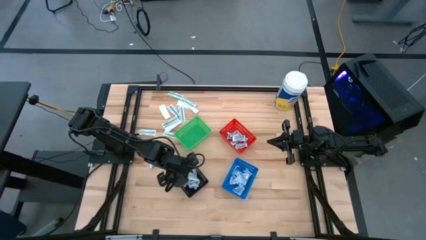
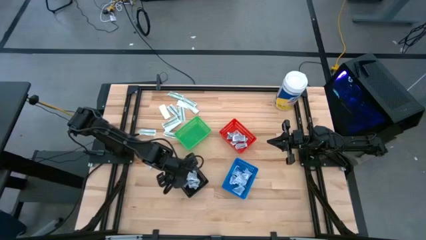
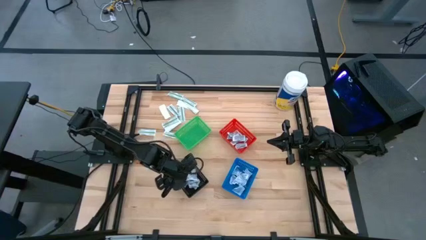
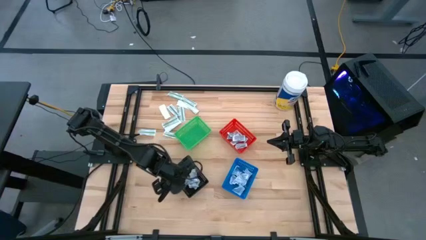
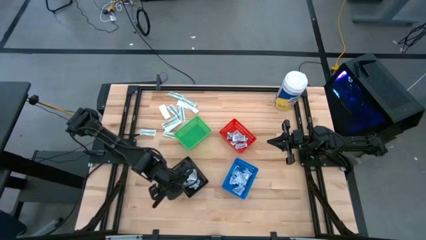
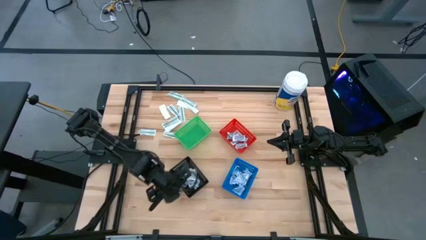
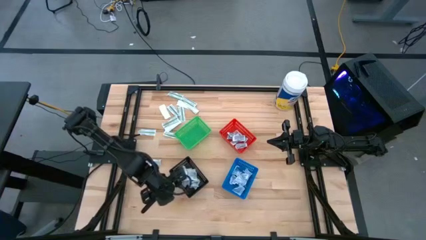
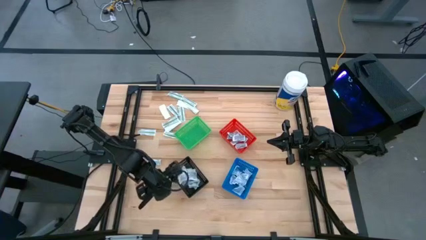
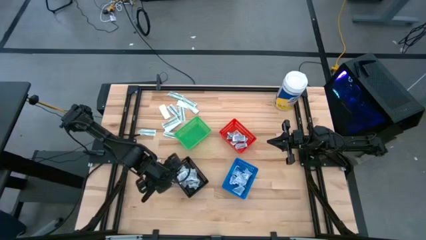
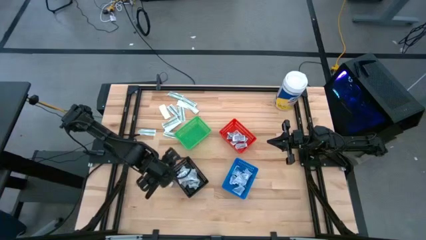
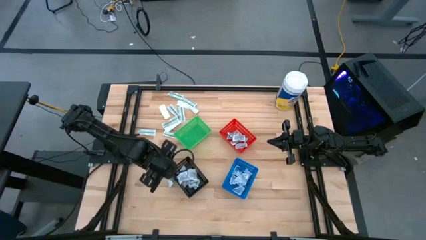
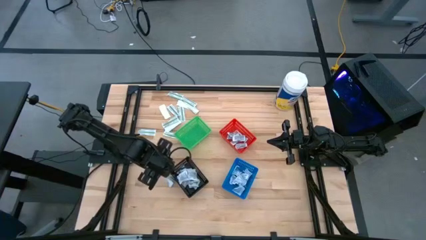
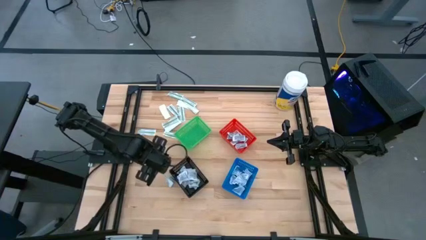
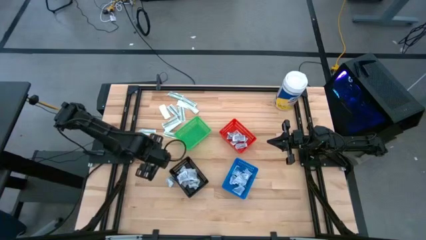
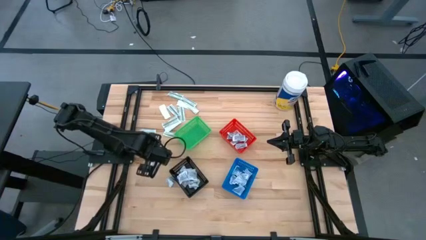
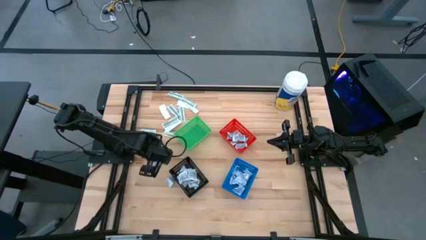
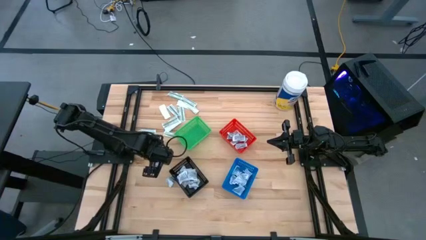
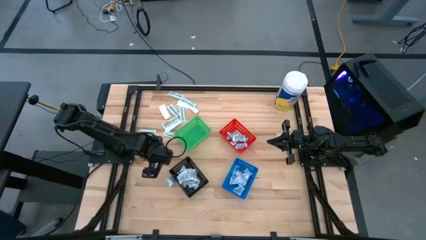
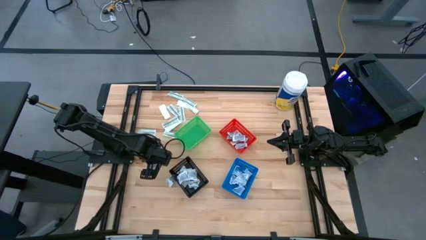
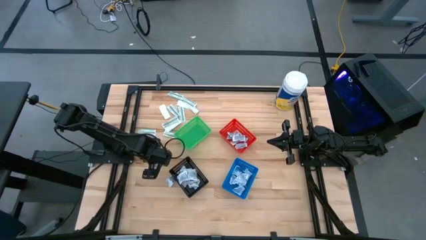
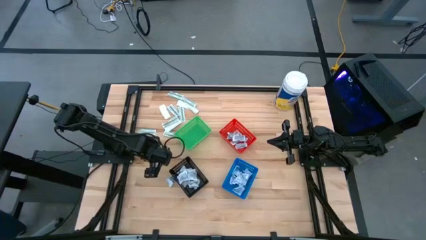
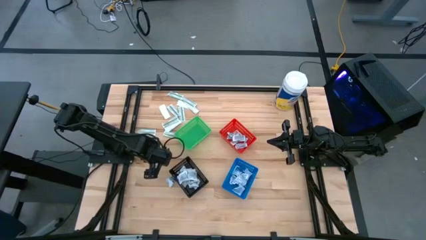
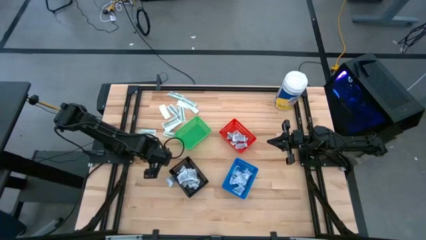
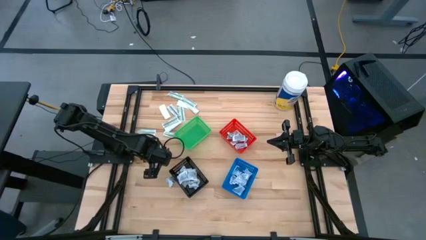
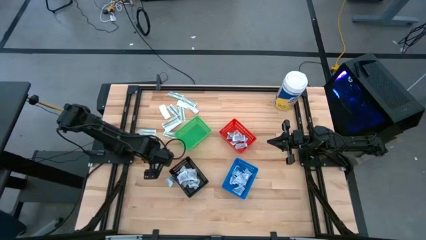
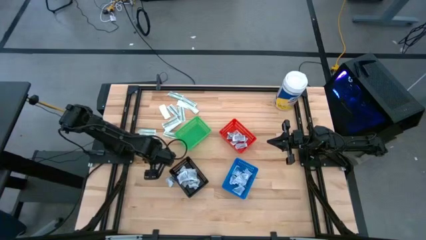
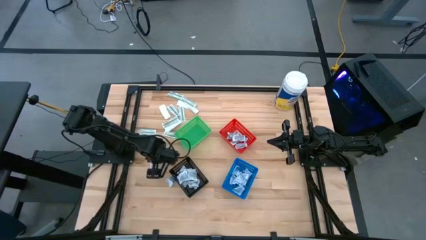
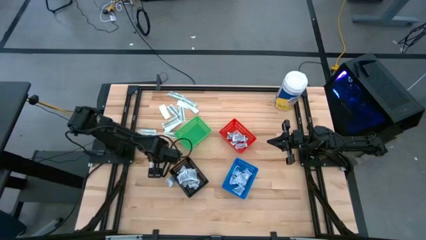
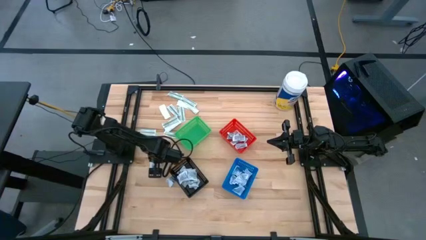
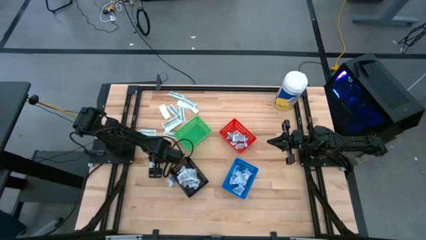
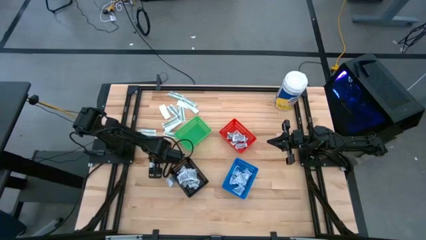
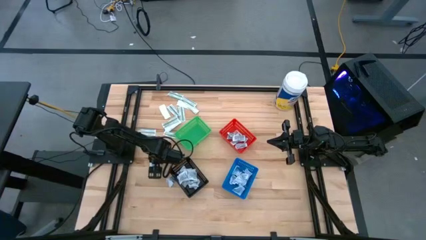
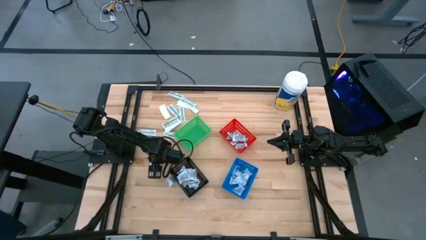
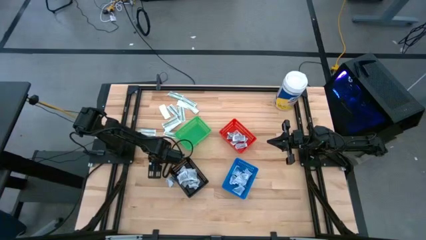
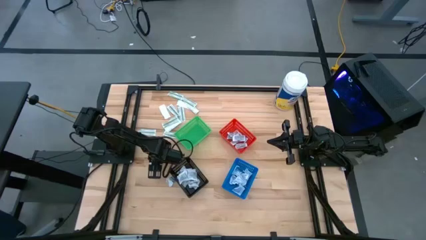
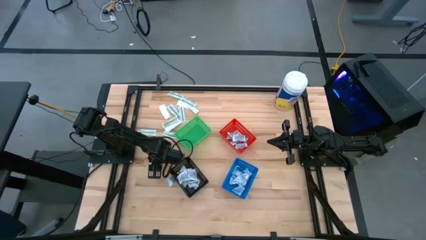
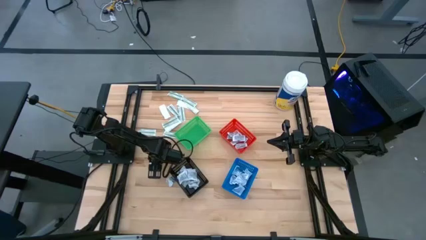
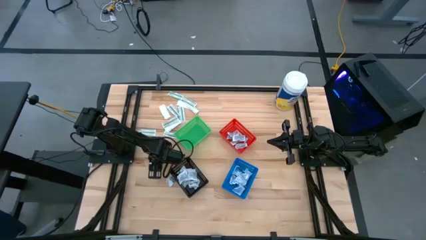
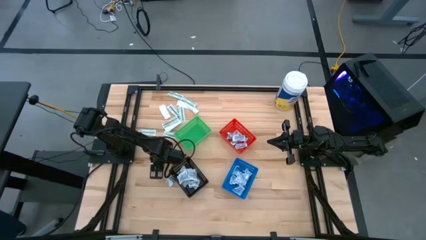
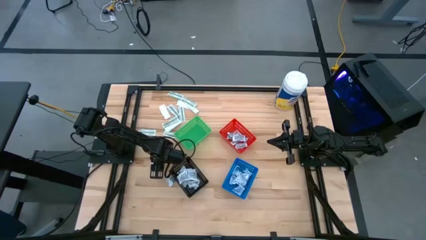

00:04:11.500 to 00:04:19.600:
Task: Pick & Place First Aid Supplies
Put the black towelette pack into the black bin

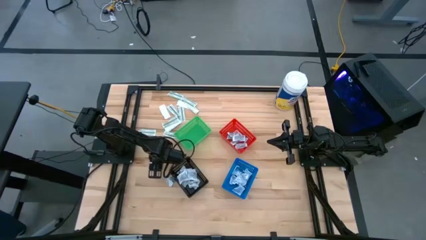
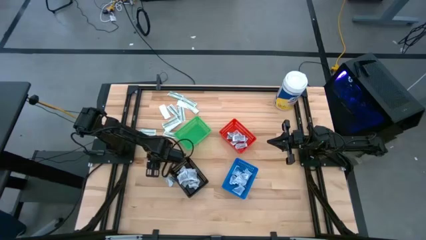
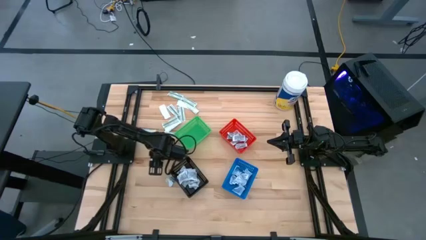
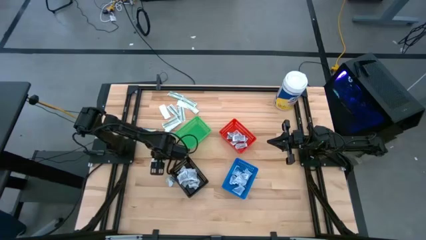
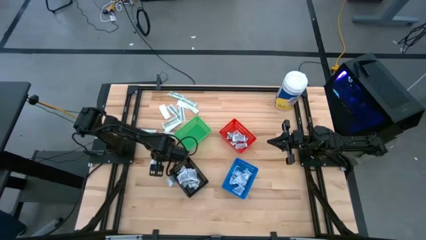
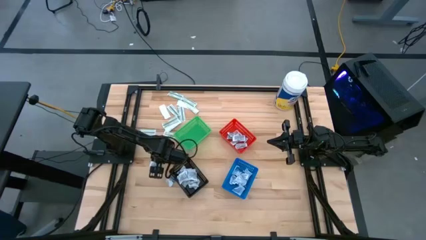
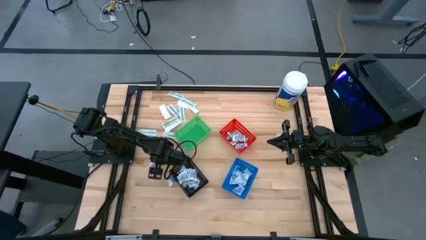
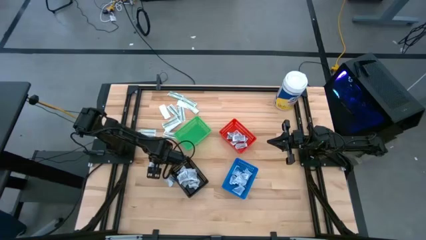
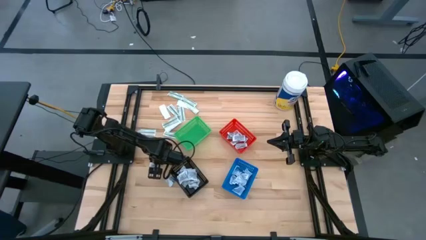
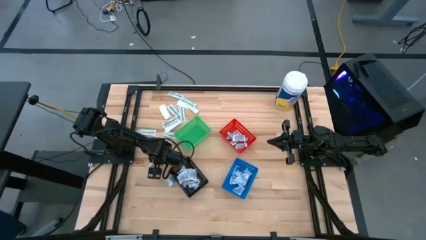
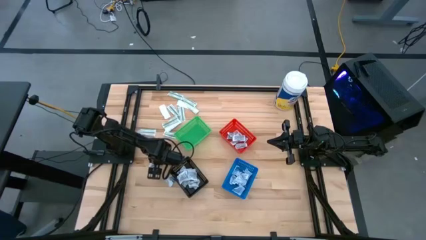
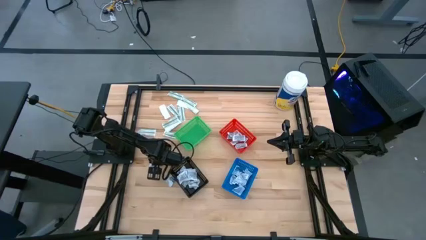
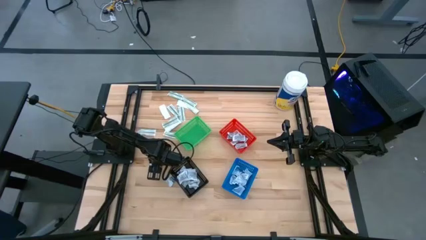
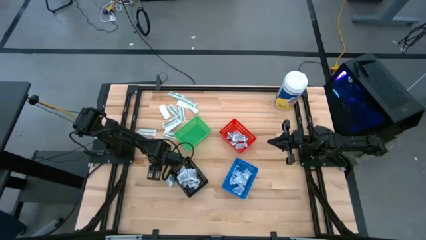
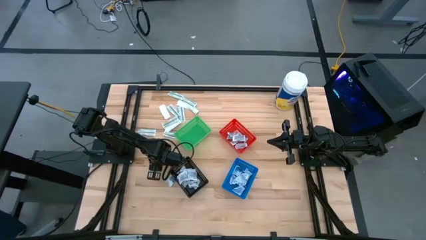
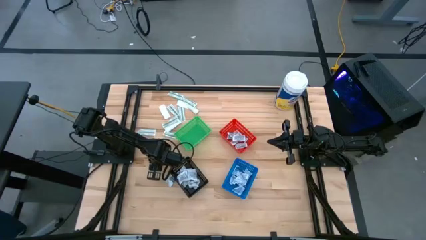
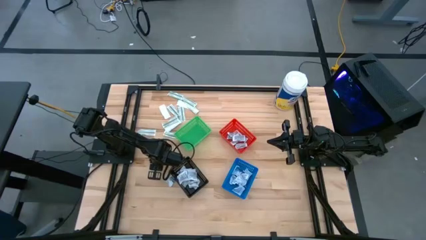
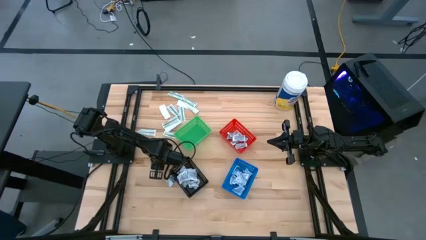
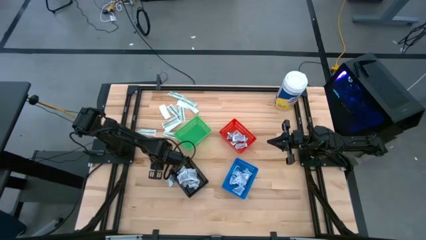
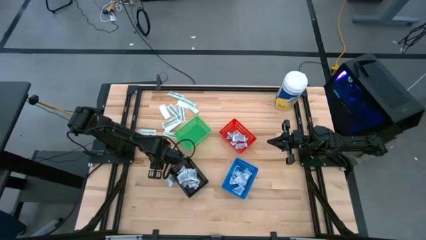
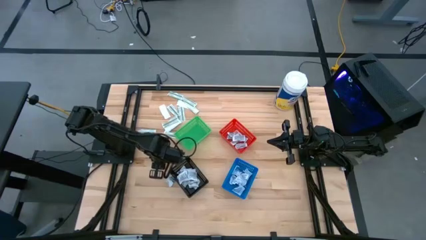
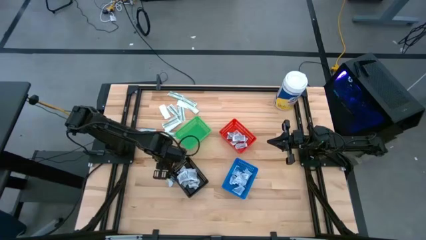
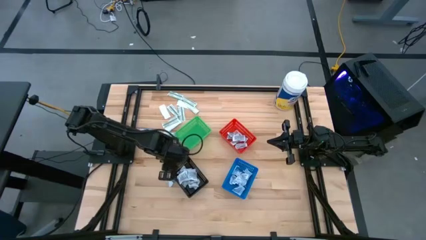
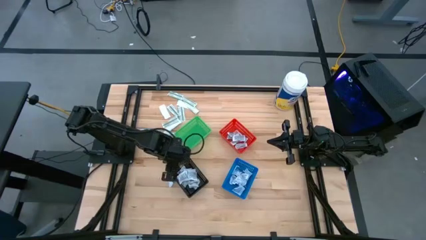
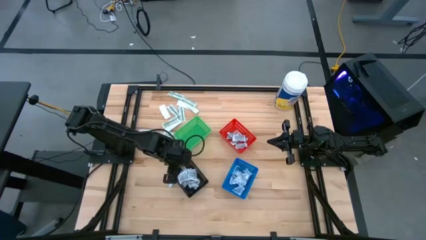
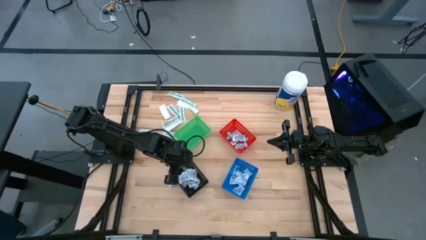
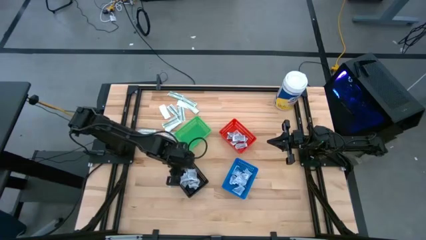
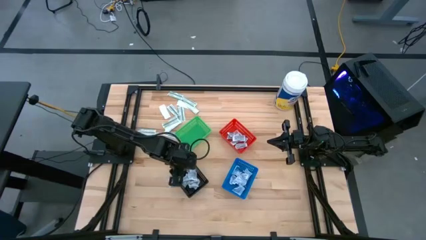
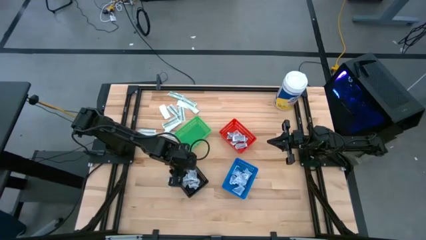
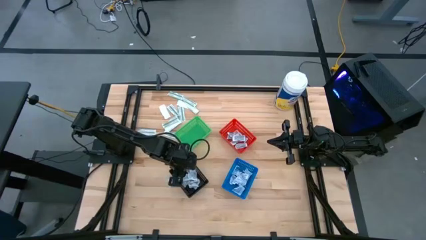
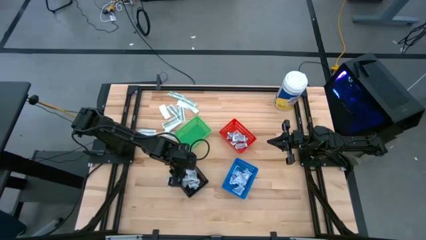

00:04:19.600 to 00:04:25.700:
Put the black towelette pack into the black bin
